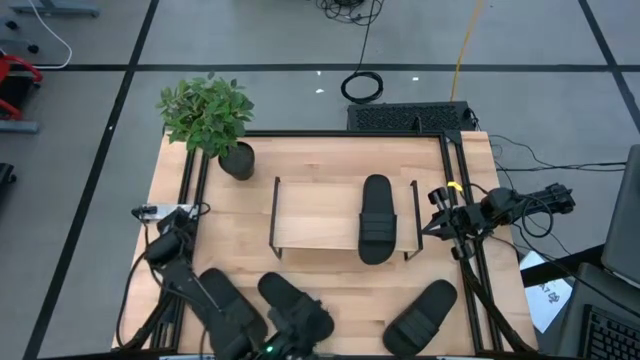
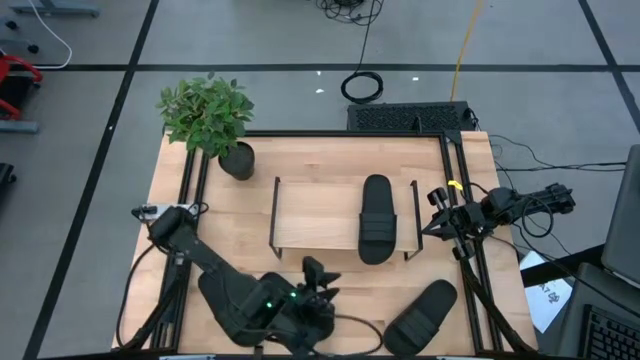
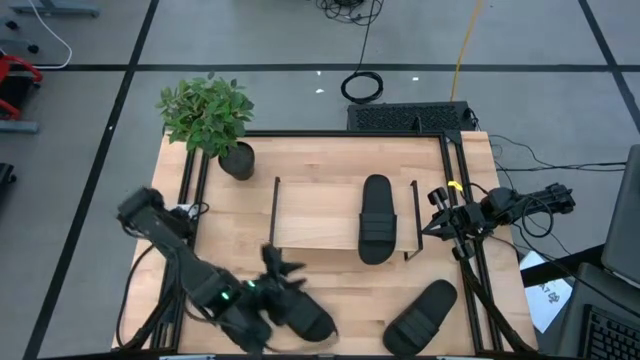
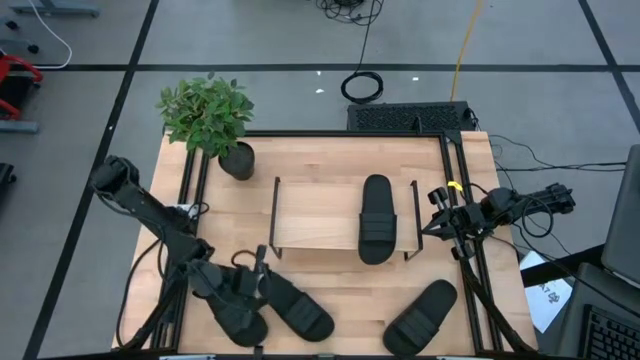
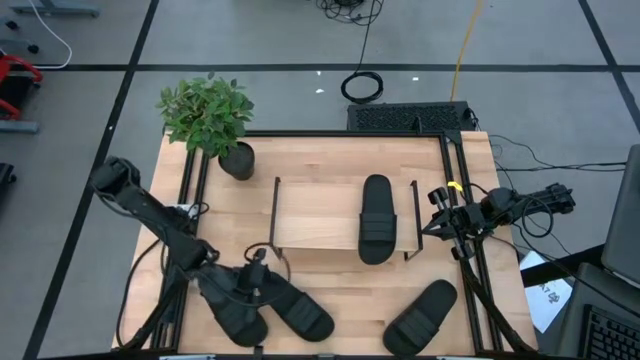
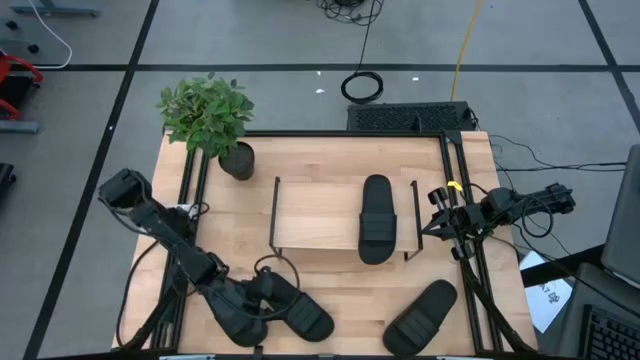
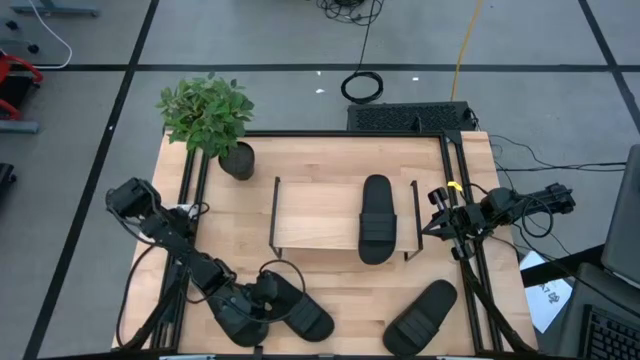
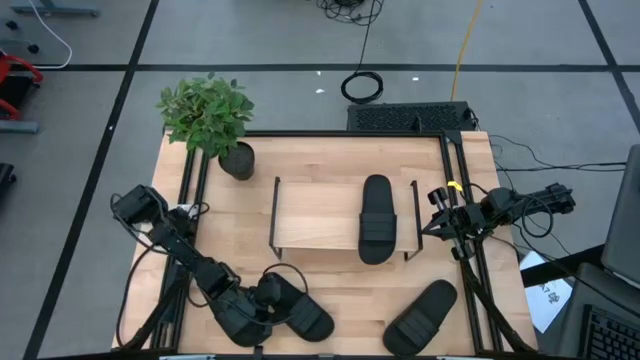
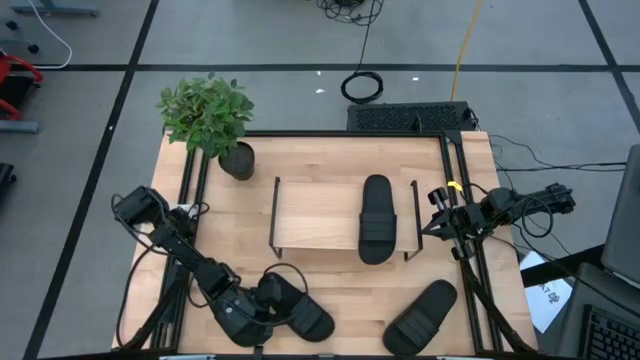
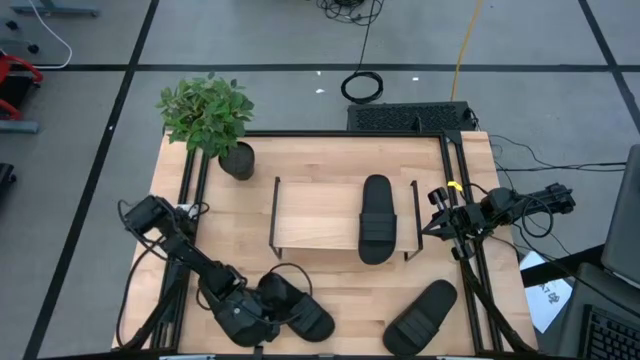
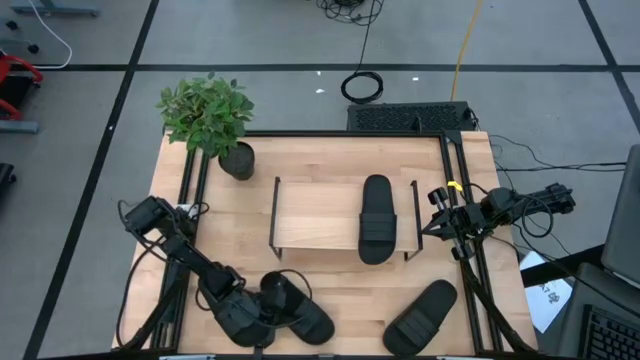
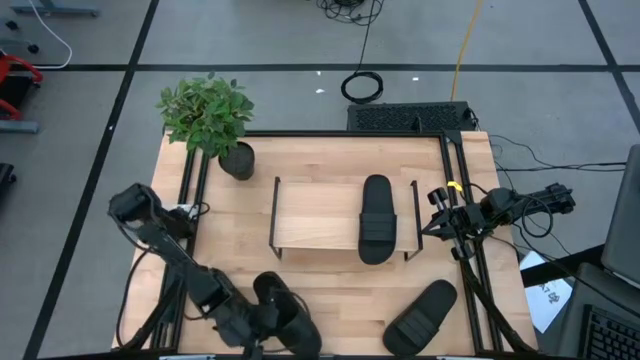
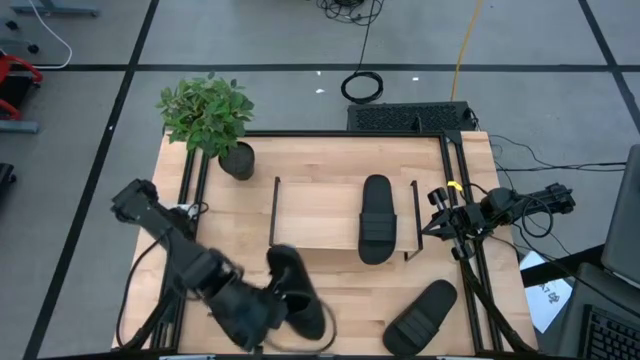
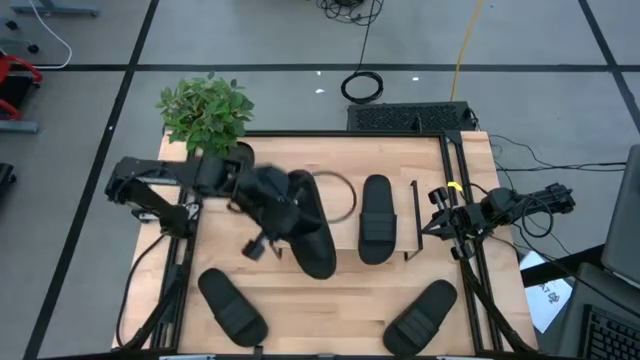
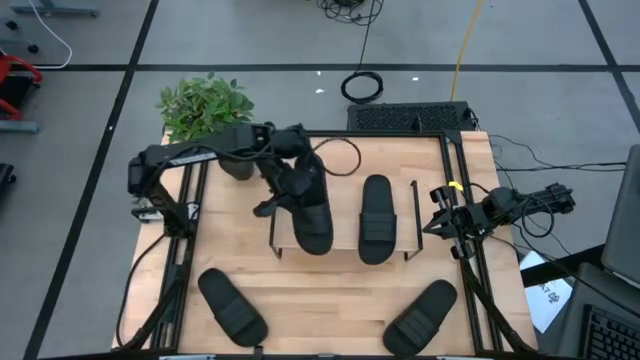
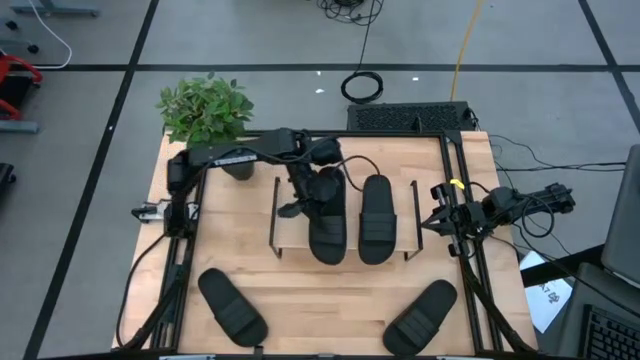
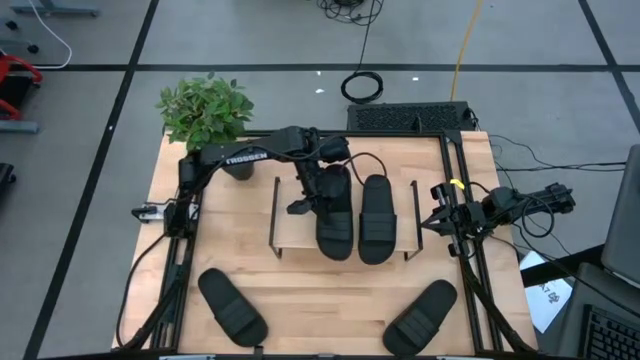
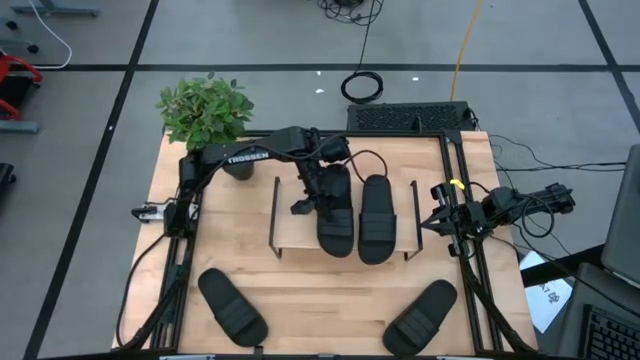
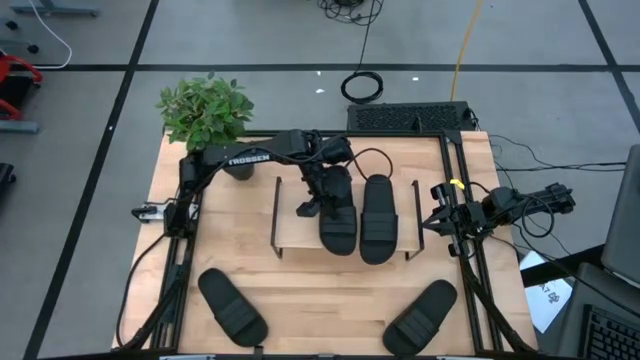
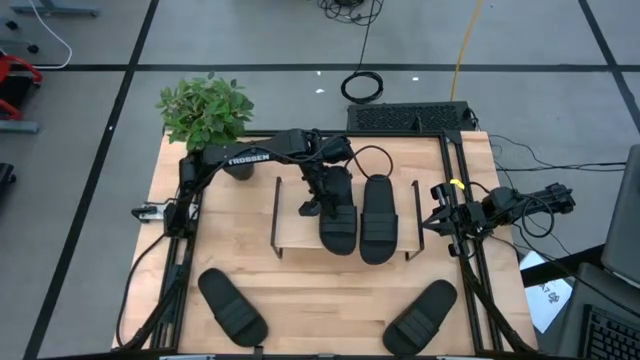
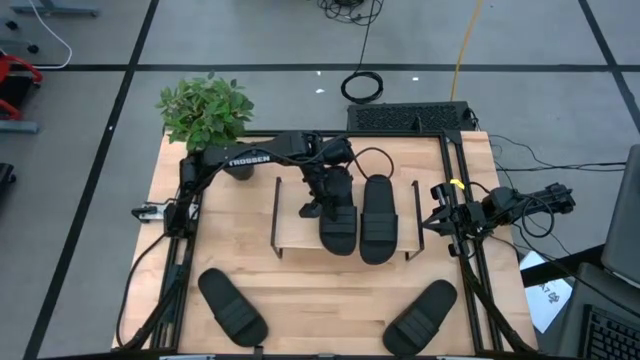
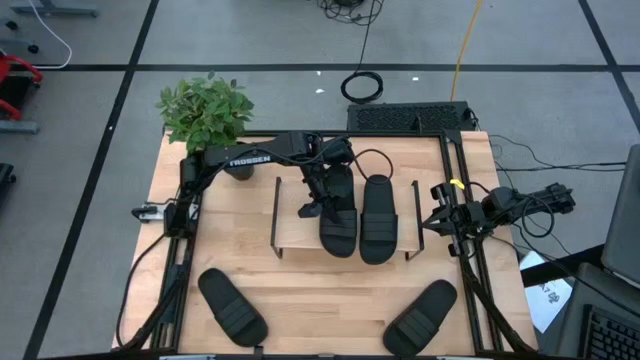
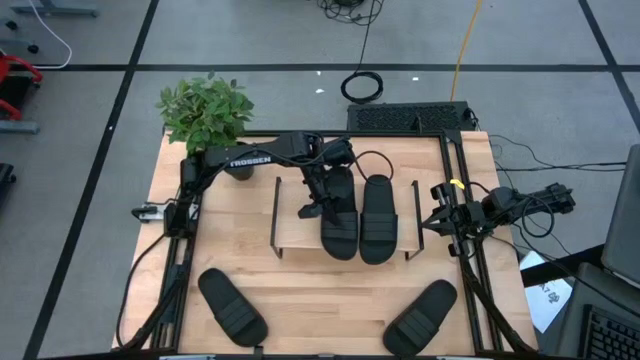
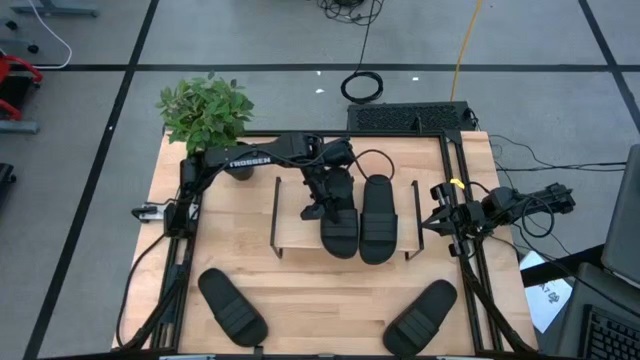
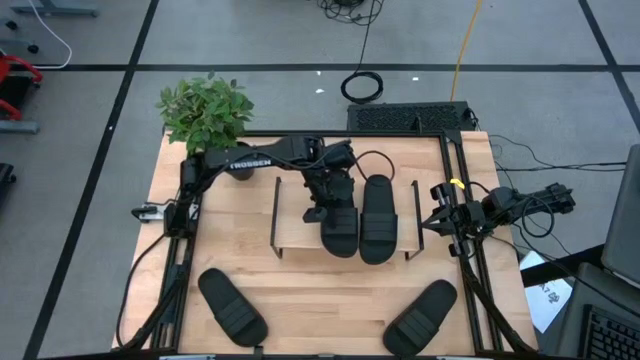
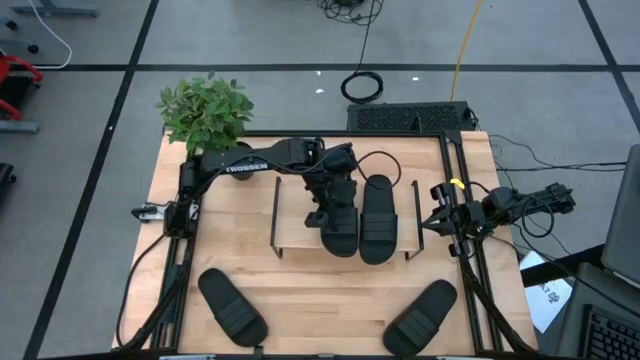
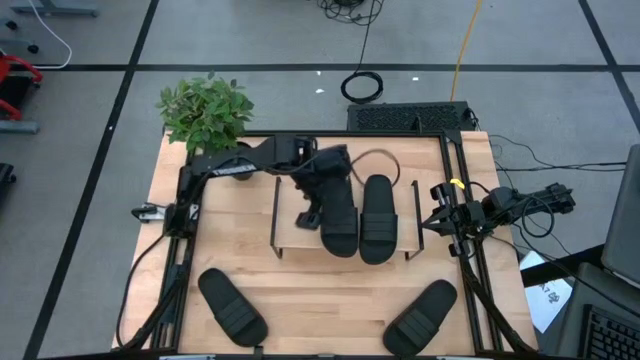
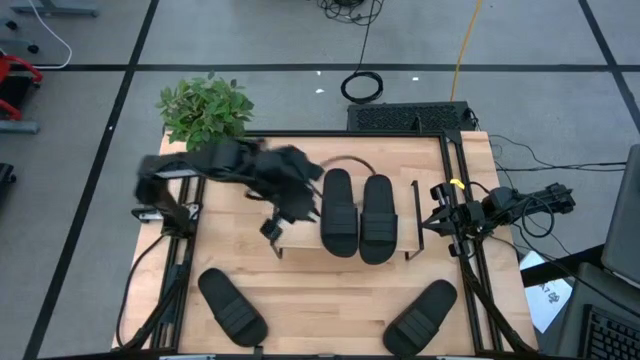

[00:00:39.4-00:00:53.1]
Task: Pick and place slides into the shelf
Put the black slide on the shelf

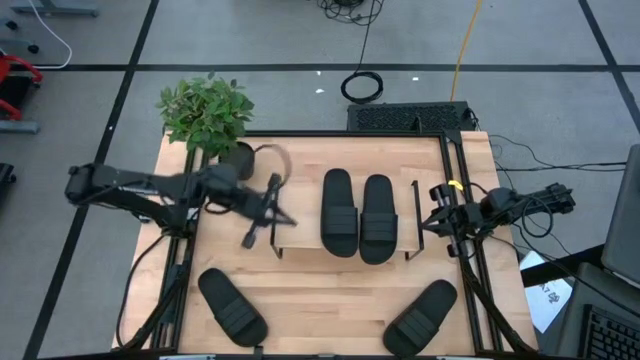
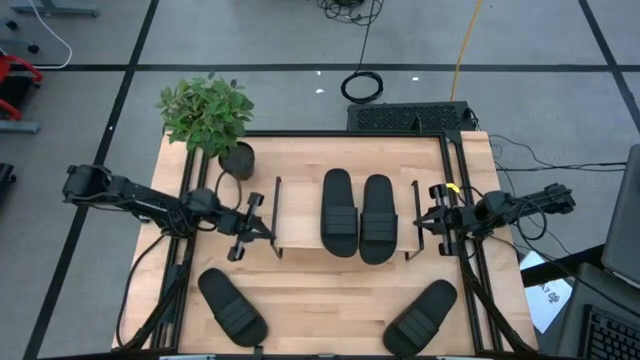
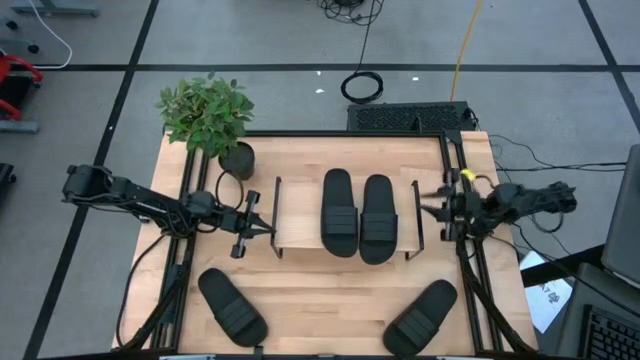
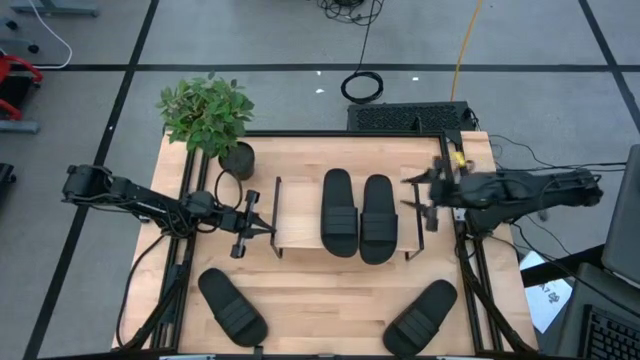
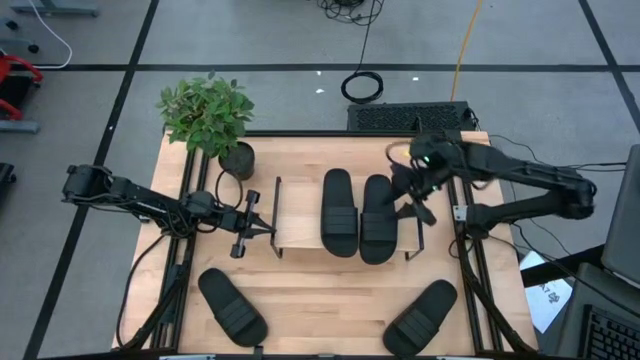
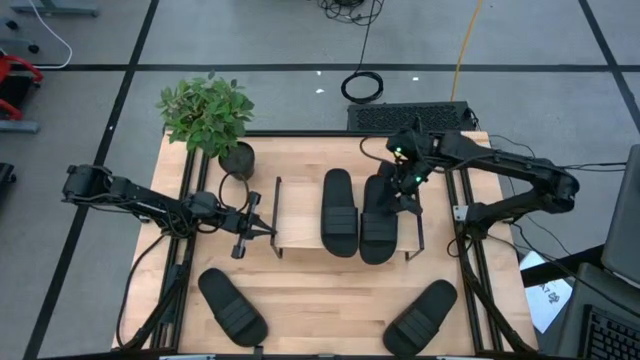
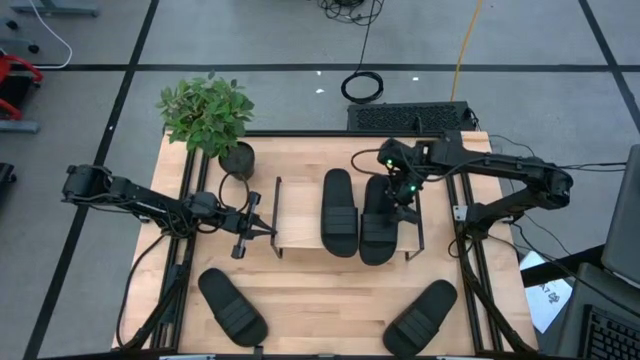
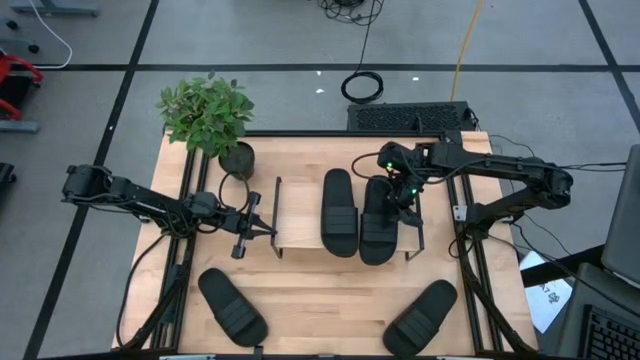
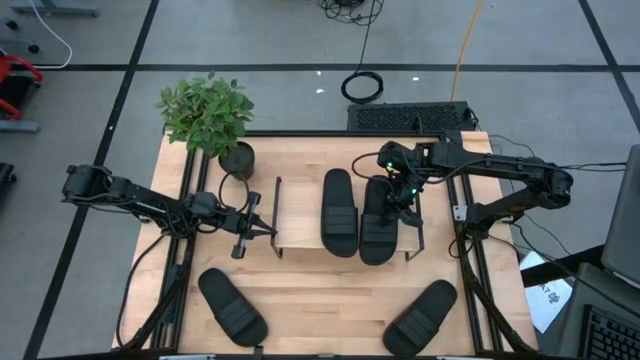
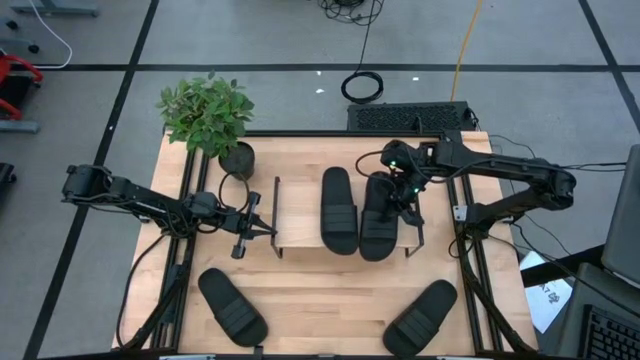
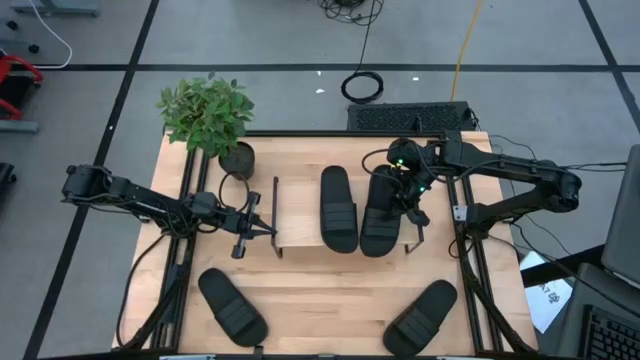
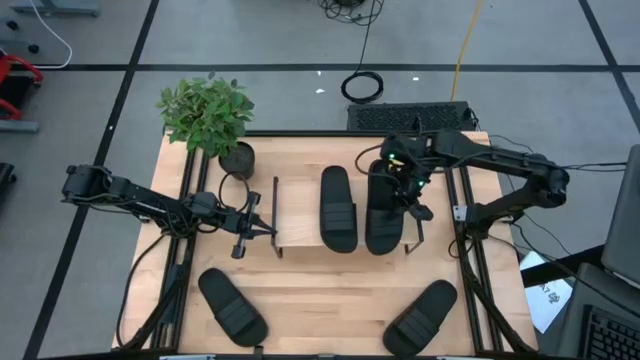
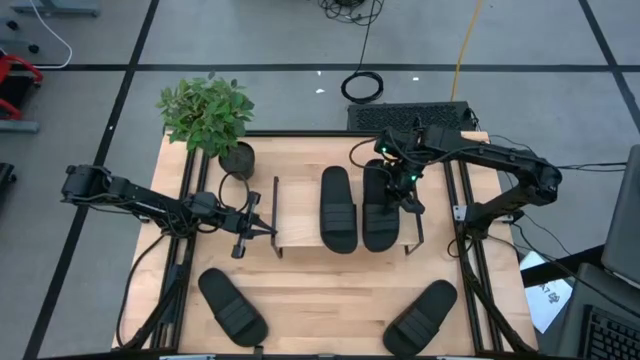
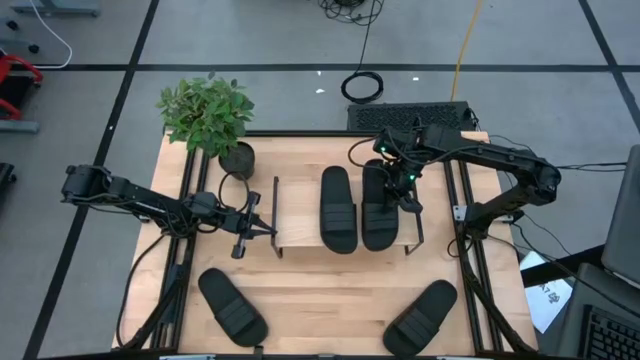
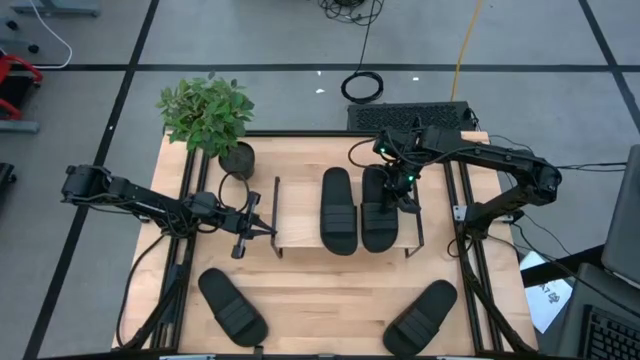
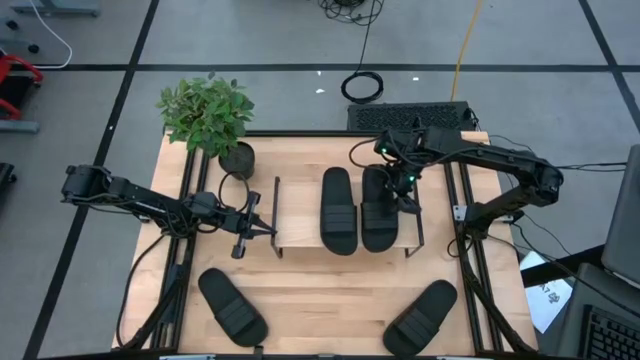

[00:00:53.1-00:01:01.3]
Adjust the black slide on the shelf
